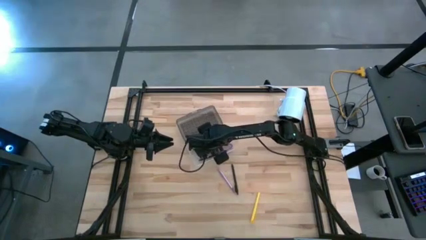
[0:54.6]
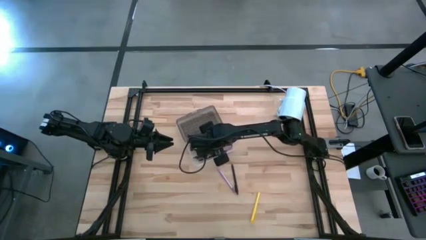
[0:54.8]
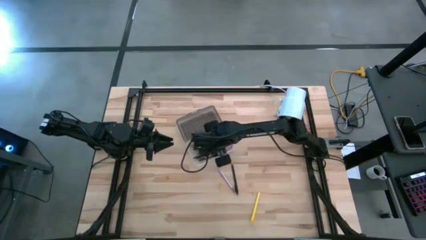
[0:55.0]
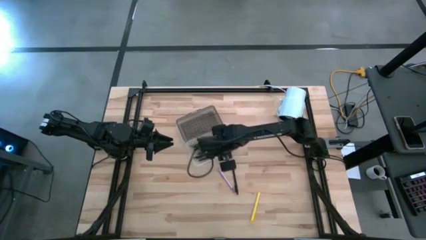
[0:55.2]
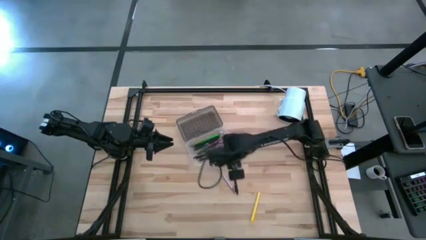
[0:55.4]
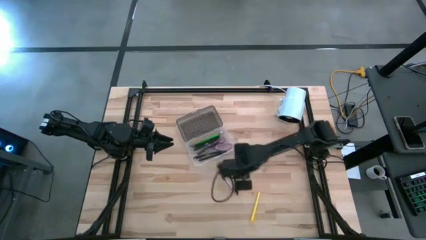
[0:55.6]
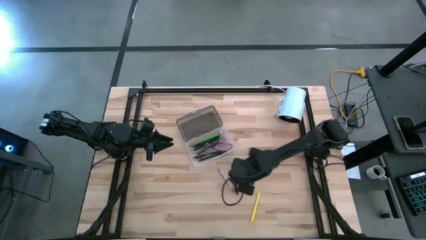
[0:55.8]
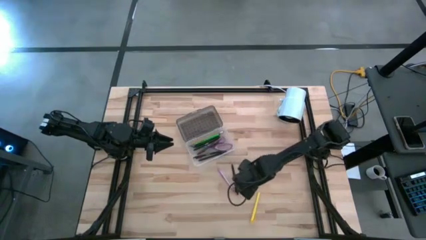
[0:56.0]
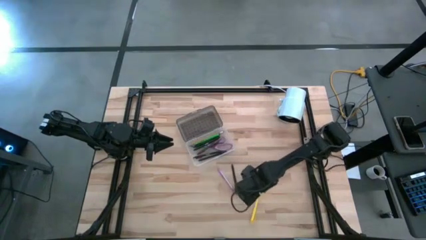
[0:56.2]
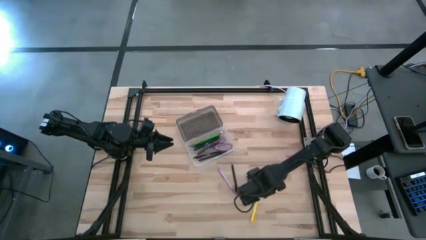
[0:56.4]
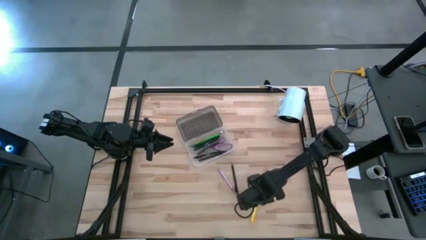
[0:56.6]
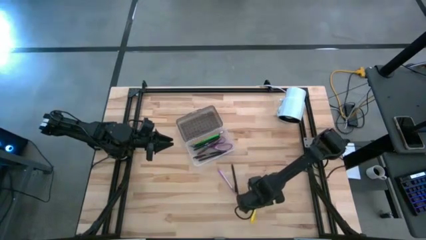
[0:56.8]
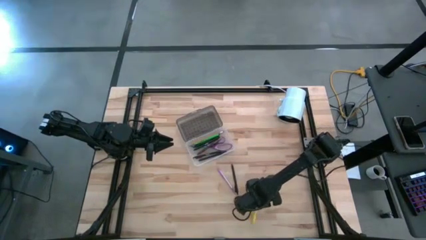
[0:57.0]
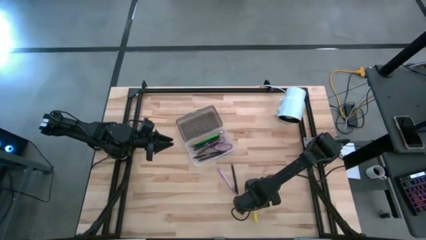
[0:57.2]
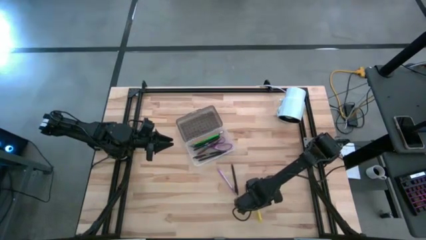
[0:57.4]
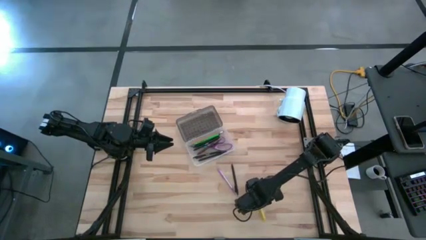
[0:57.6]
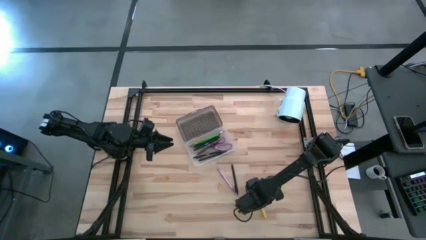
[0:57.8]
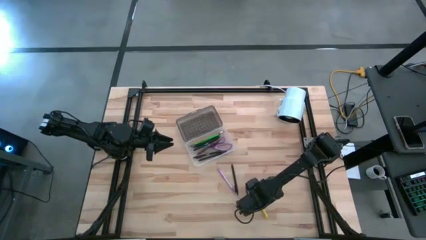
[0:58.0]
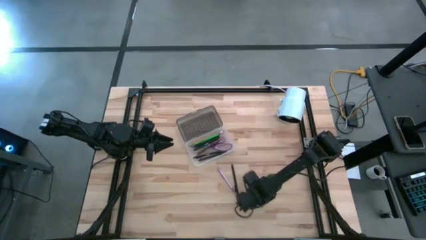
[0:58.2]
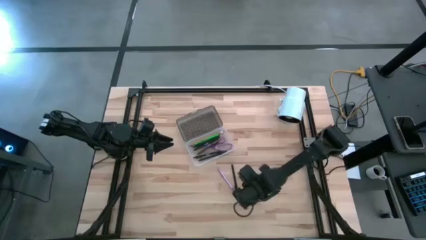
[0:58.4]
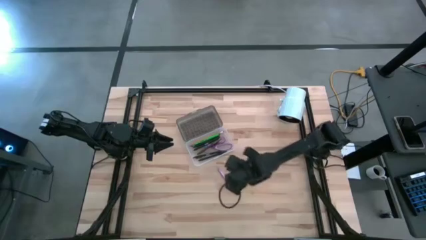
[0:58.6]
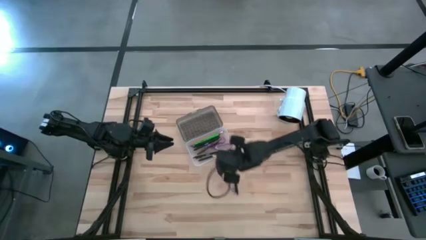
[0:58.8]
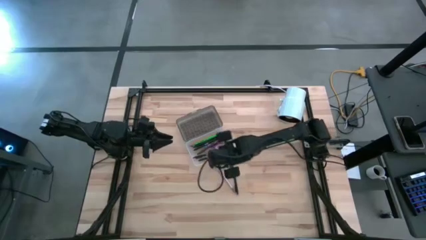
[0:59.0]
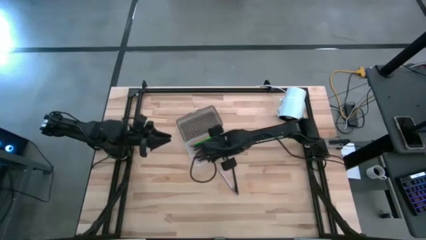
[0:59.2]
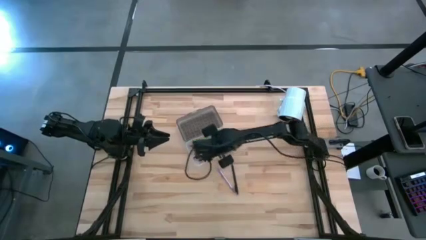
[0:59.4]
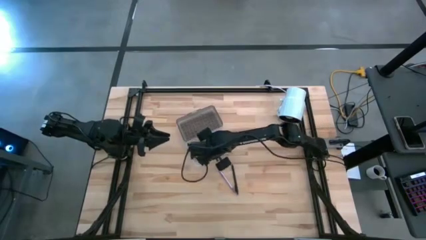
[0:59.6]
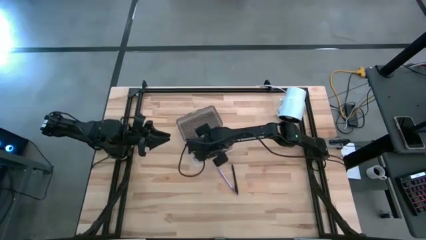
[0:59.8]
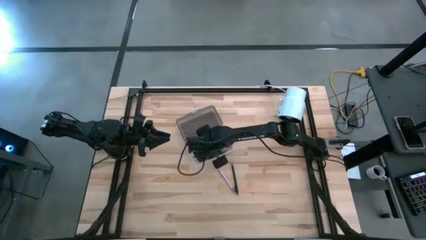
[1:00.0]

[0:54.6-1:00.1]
Task: Pick & place school supplies into a supply box
Put the yellow pen into the black supply box

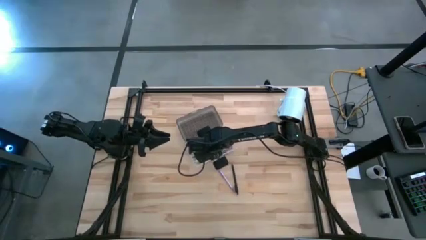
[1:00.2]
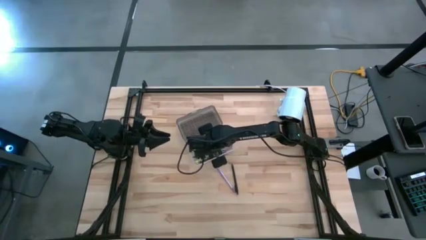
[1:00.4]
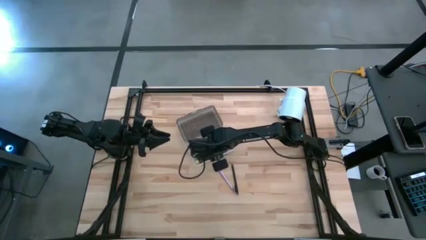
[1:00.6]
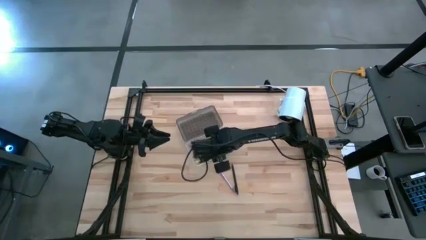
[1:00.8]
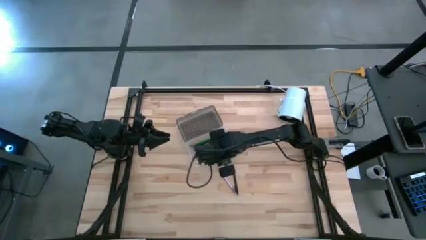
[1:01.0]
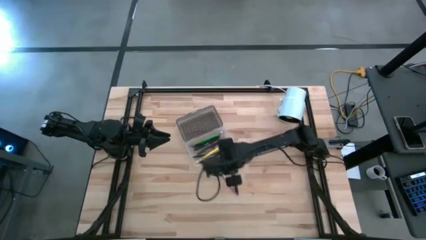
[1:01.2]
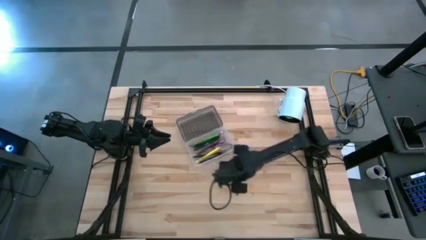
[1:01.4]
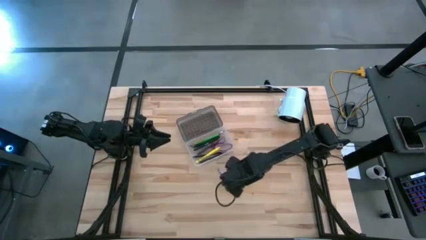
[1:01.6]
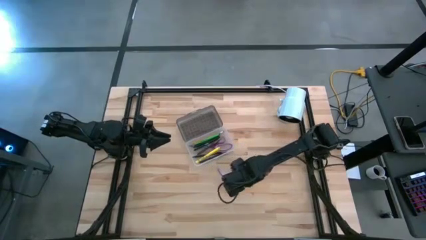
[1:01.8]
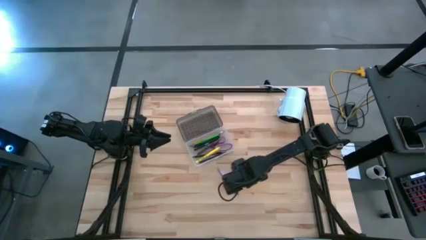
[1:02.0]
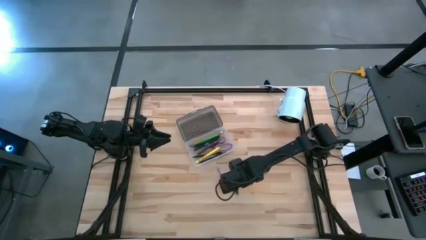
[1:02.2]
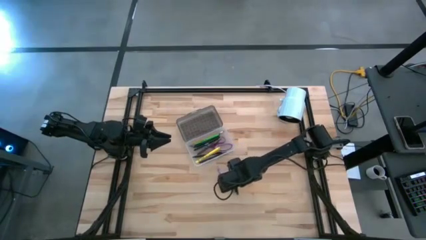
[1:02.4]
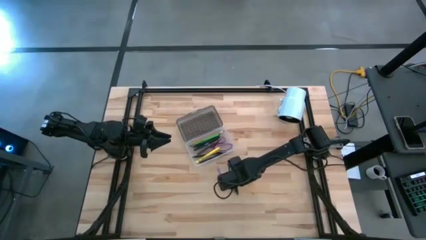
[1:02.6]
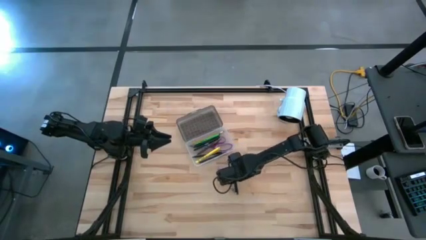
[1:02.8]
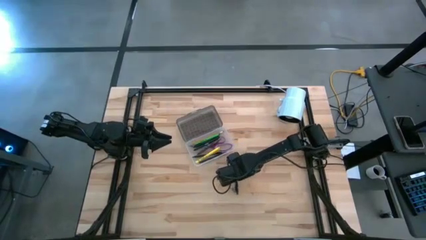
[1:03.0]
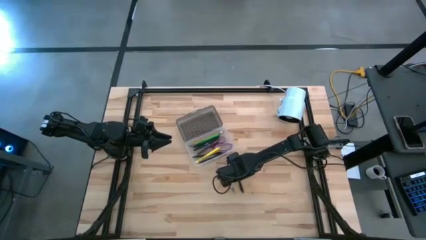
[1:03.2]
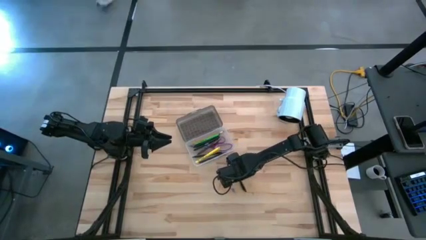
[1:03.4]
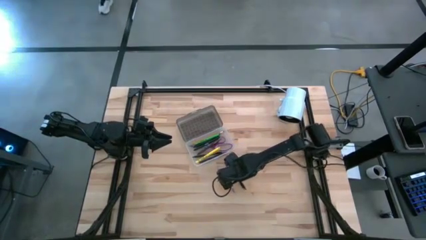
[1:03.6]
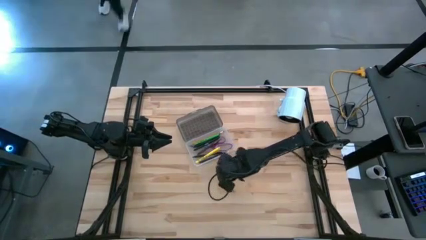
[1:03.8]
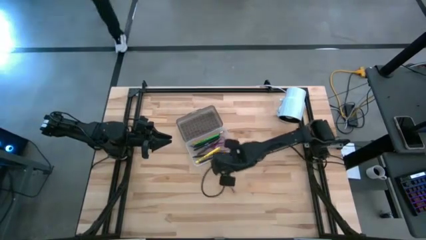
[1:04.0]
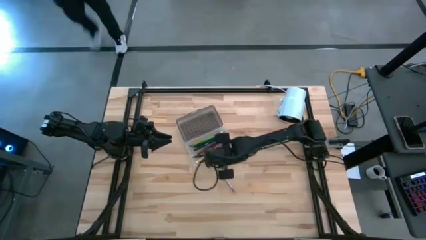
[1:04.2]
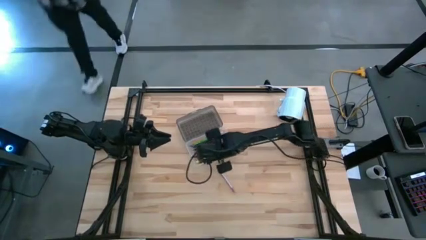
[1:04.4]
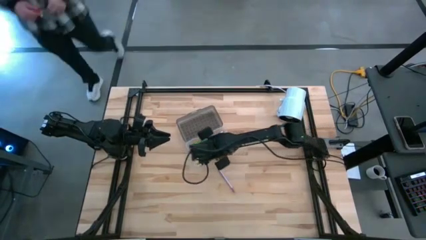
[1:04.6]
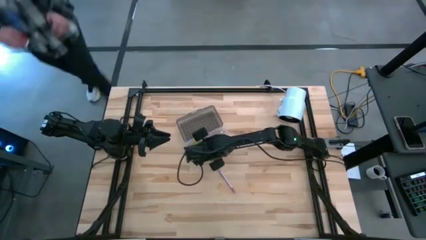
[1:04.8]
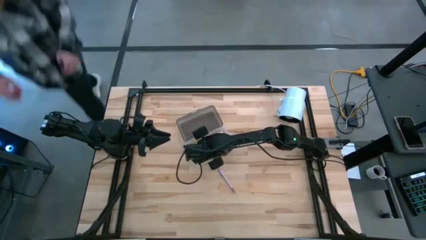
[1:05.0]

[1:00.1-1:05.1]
Put the black pen into the black supply box

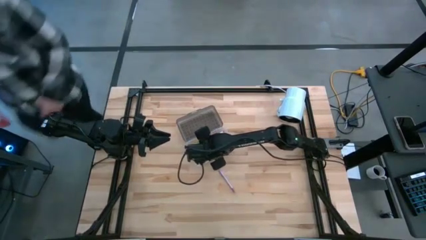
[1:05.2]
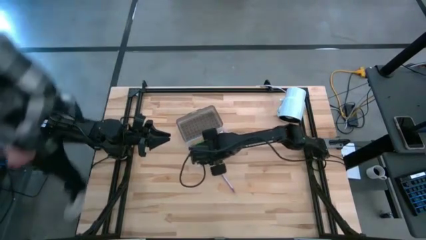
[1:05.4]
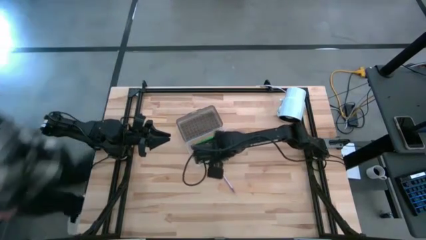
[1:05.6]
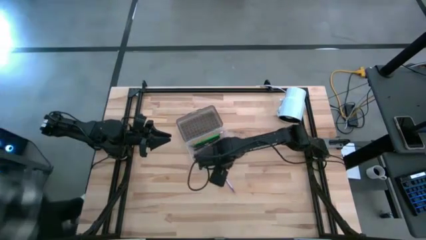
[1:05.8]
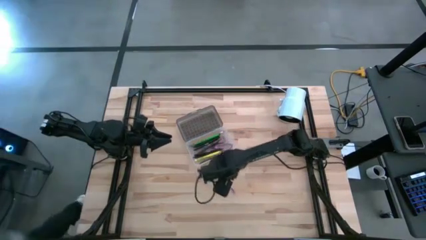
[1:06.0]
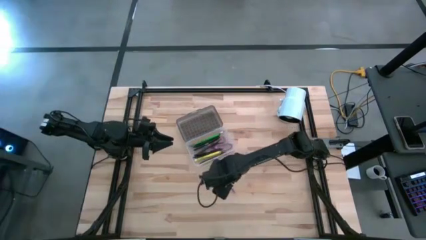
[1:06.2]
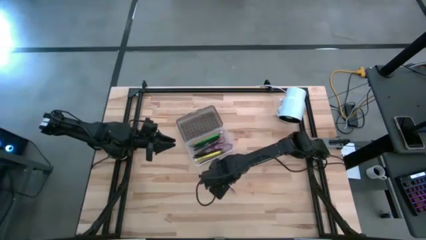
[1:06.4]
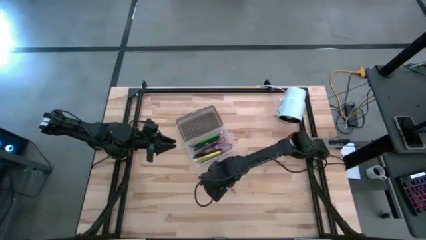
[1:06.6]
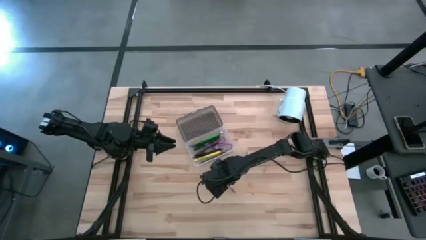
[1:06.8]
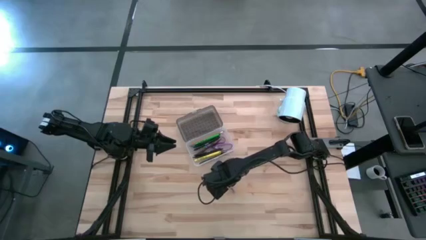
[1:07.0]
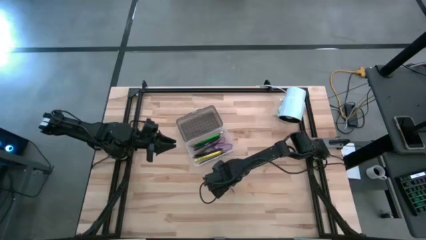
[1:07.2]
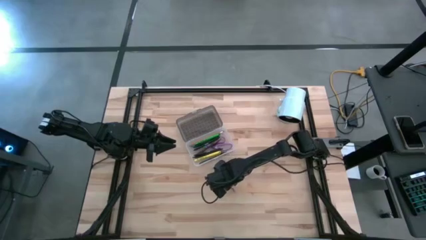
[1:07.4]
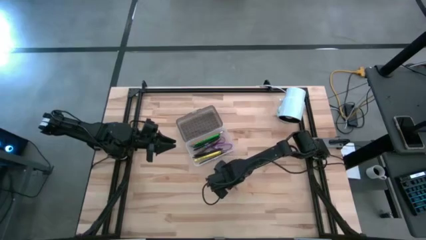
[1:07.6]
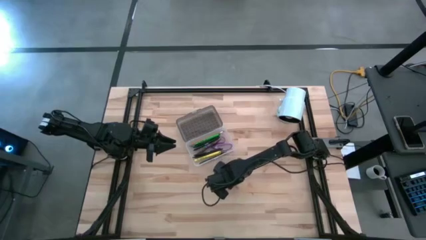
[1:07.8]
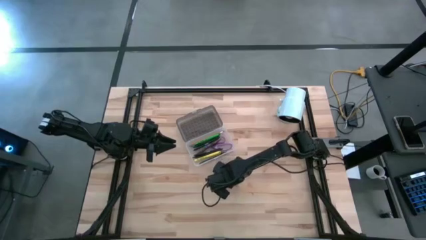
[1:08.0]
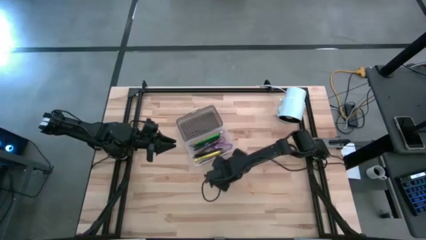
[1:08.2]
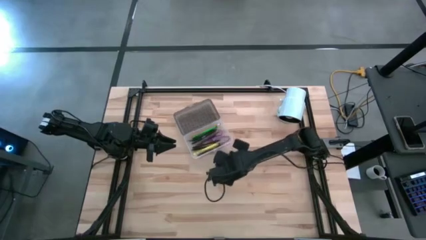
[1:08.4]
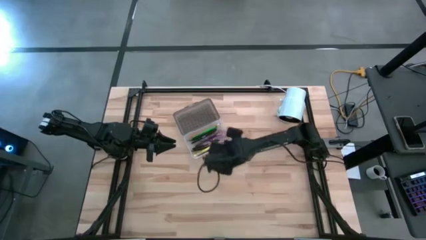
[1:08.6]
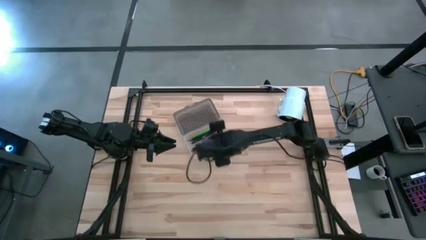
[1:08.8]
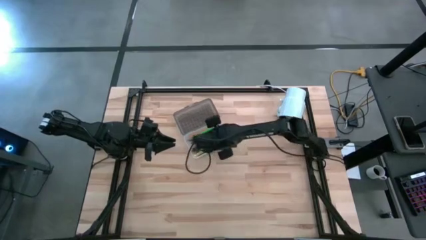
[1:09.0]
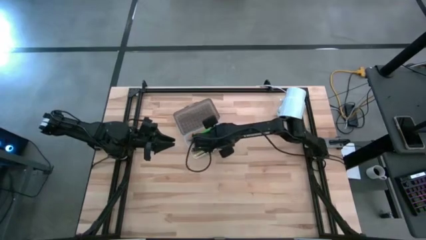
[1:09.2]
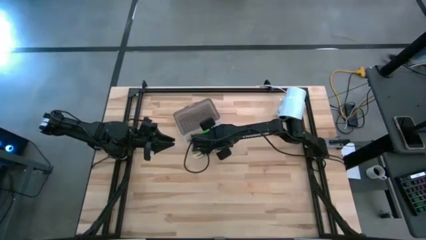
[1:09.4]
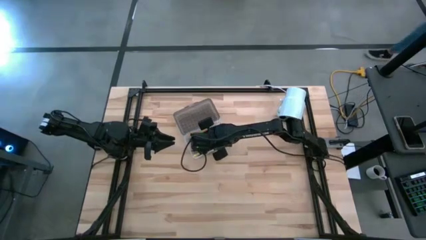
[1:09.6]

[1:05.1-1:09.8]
Put the purple pen into the black supply box

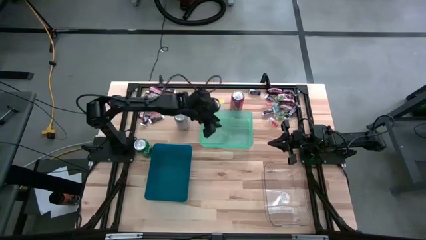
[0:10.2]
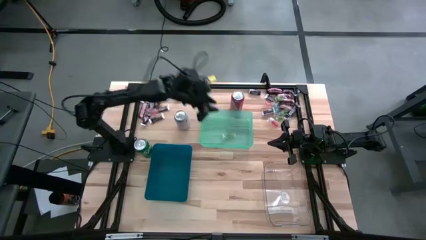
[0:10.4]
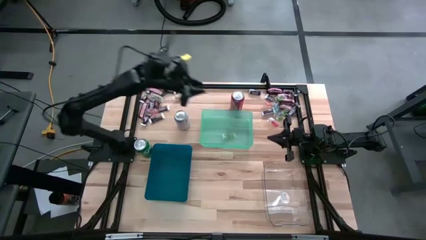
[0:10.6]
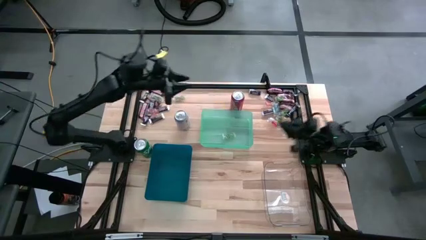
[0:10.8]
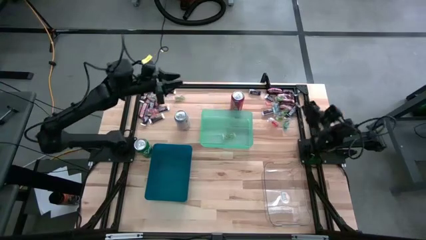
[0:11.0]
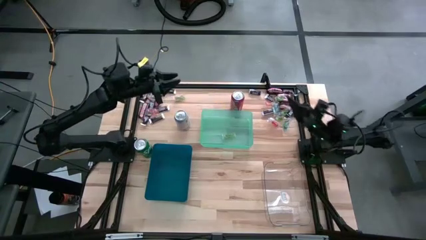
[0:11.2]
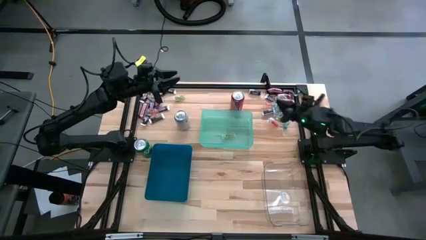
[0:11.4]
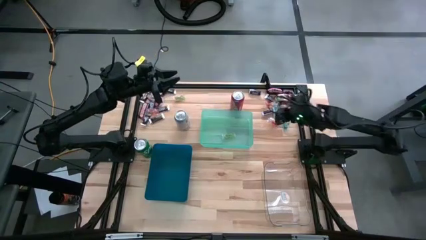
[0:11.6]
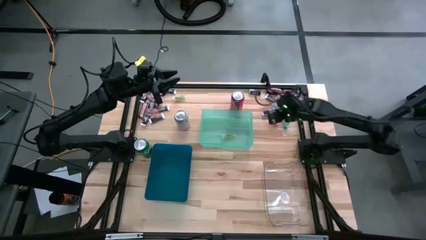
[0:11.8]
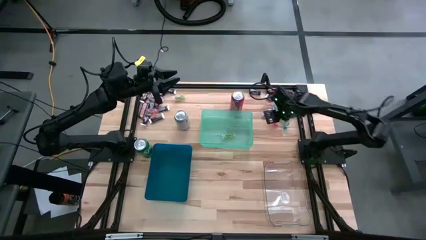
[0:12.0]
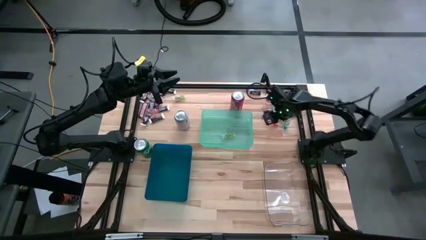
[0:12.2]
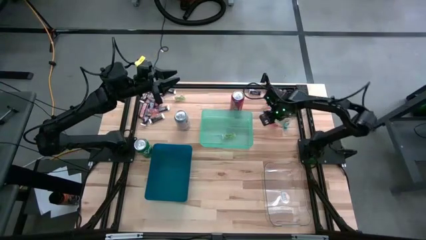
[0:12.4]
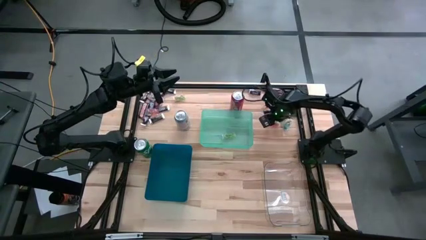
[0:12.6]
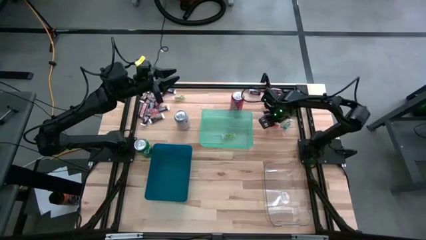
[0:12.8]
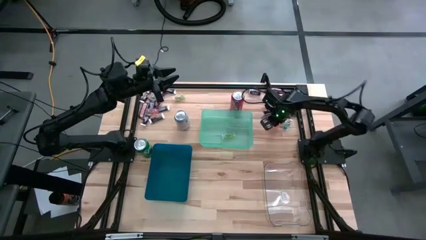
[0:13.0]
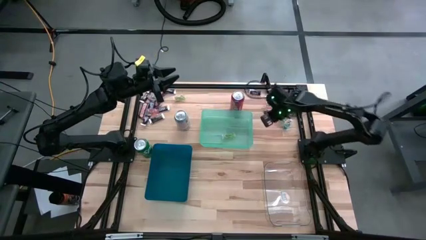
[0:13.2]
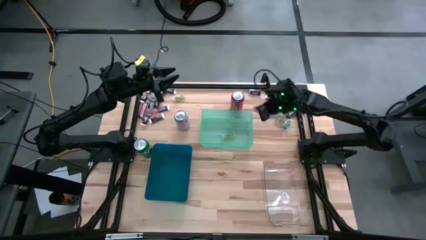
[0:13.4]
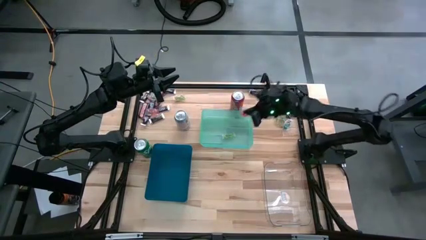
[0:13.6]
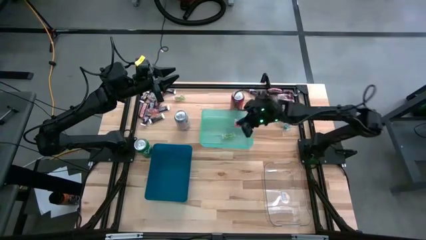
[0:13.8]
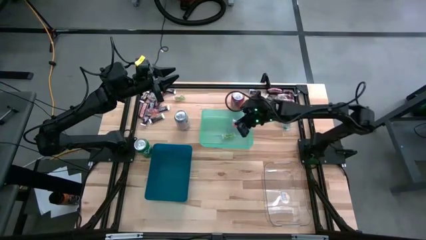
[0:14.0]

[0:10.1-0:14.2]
Task: Organize candy in baskets
Put the red gummy into the green bin
